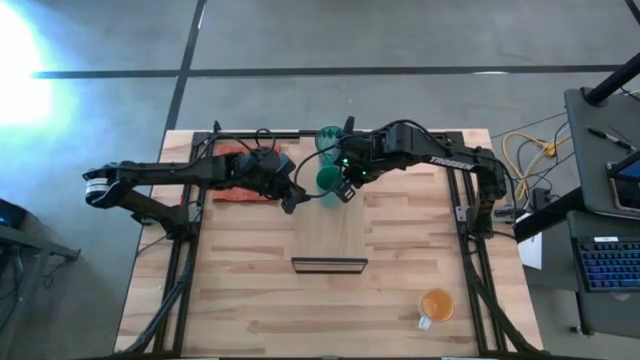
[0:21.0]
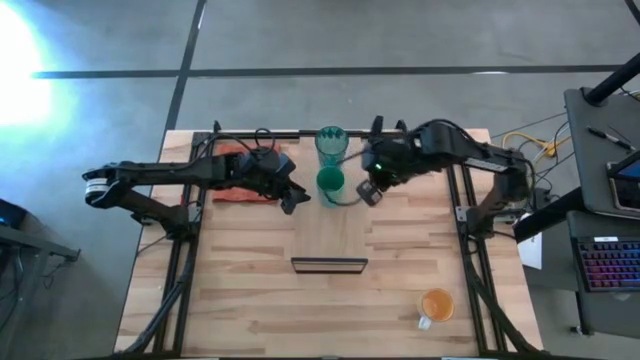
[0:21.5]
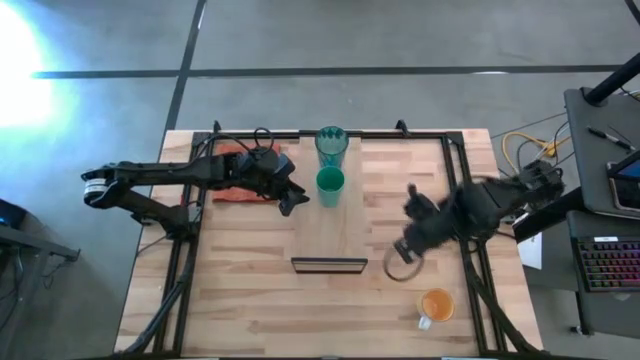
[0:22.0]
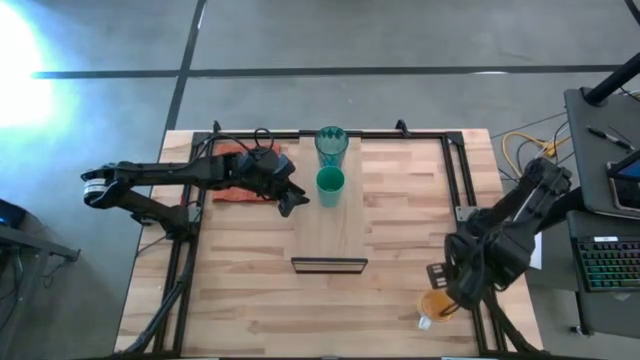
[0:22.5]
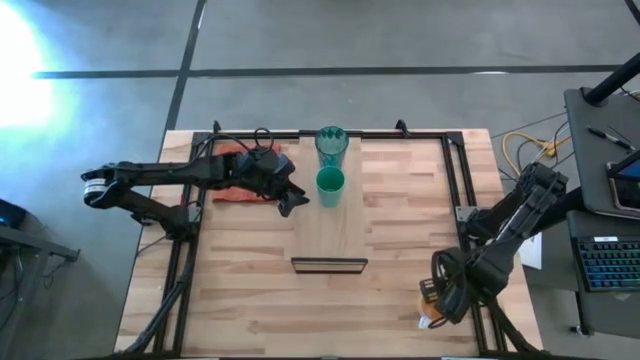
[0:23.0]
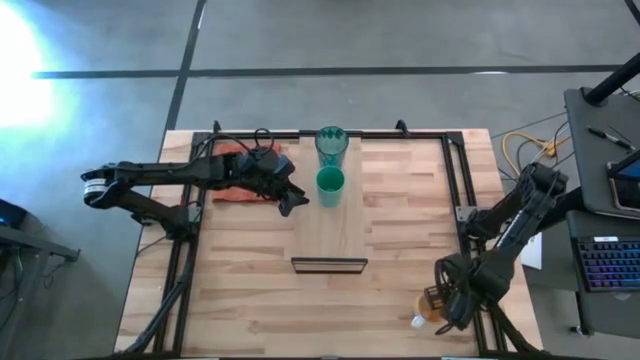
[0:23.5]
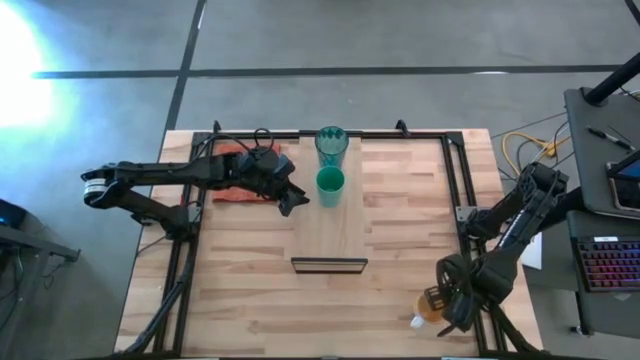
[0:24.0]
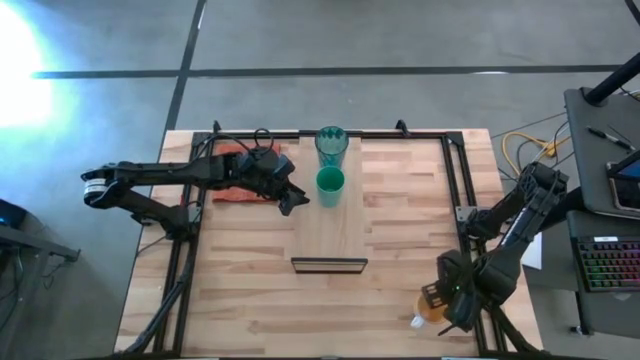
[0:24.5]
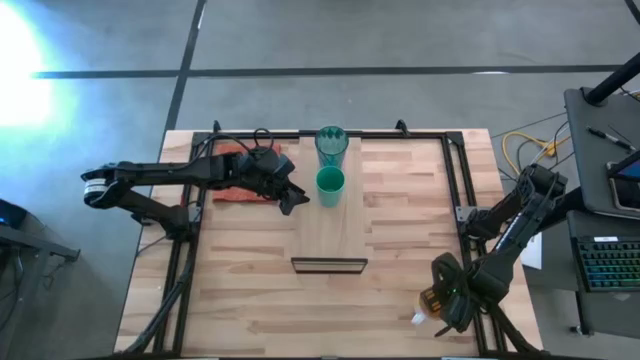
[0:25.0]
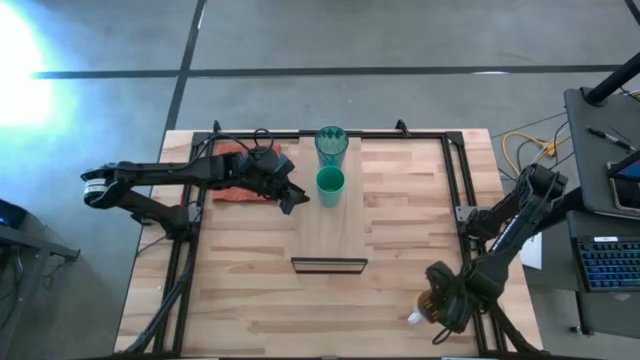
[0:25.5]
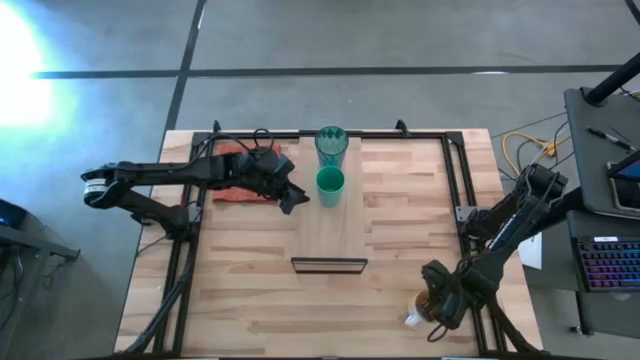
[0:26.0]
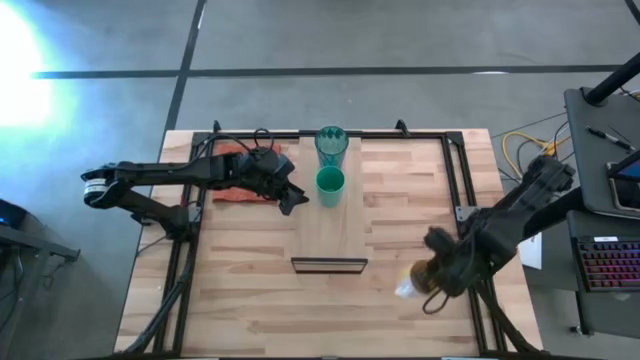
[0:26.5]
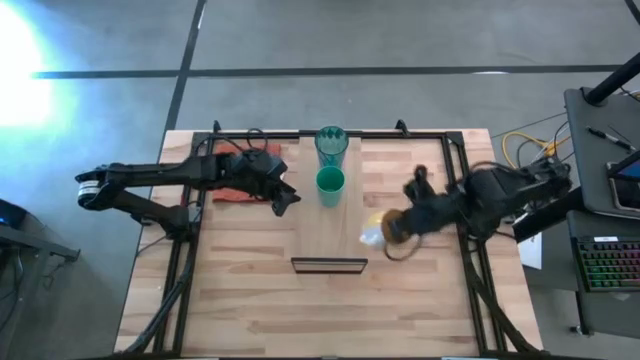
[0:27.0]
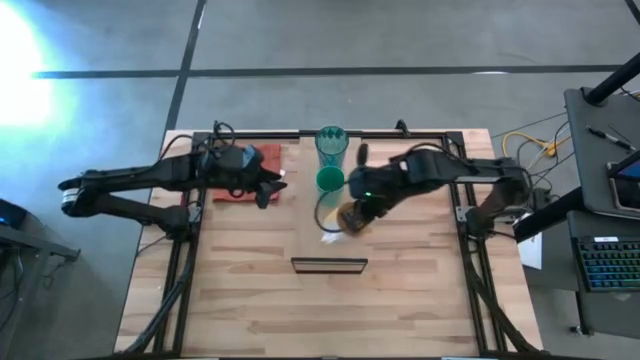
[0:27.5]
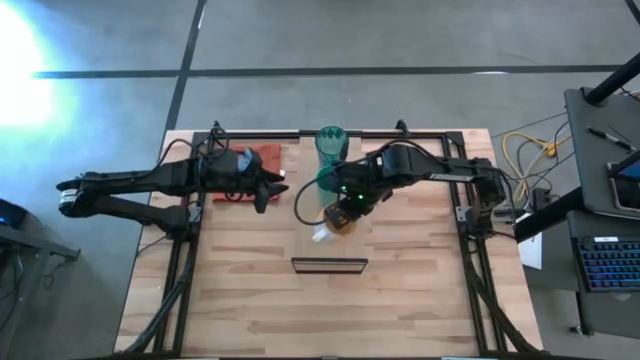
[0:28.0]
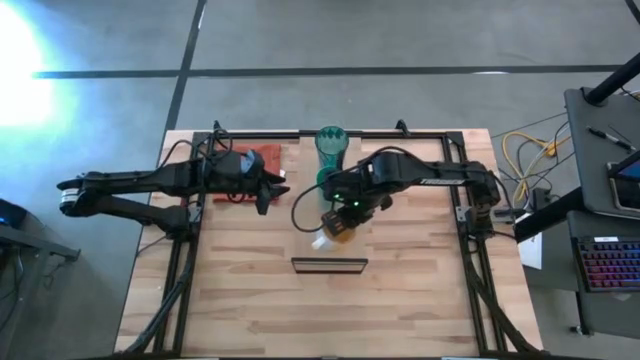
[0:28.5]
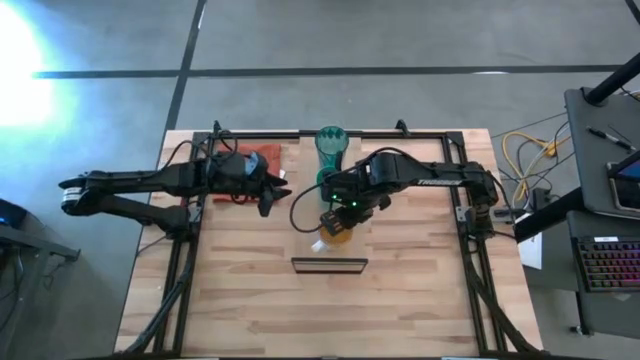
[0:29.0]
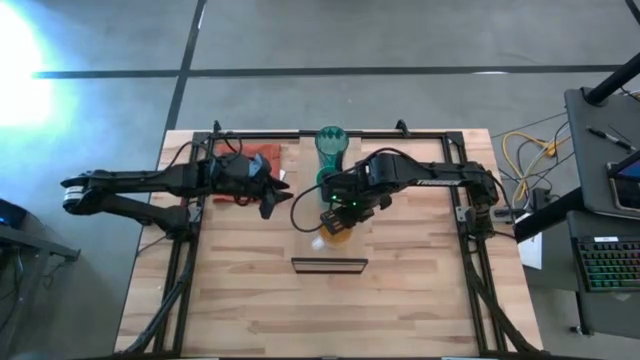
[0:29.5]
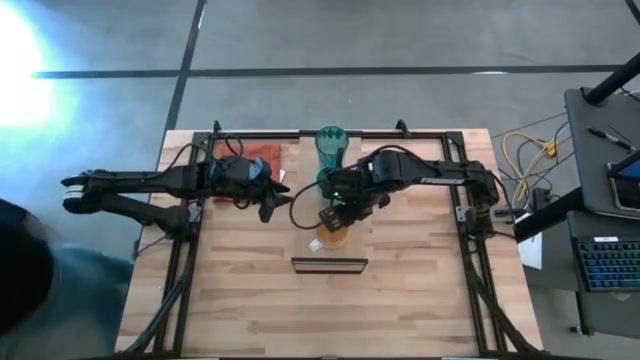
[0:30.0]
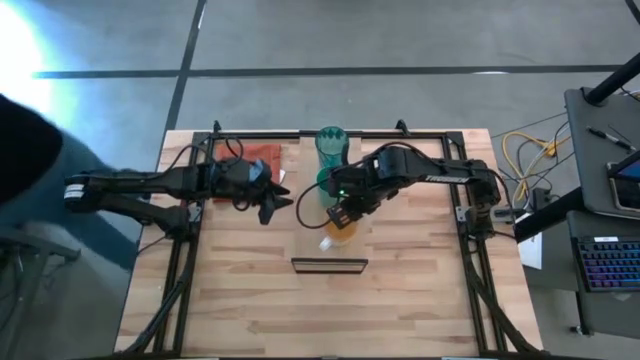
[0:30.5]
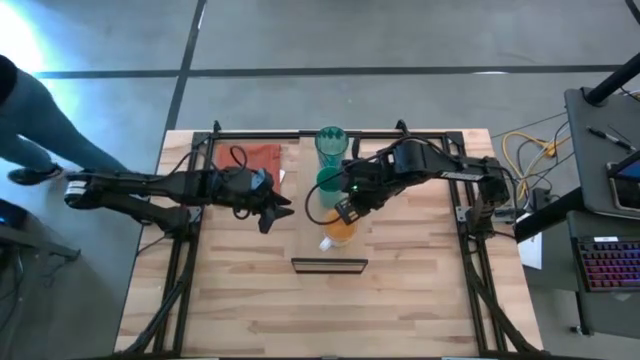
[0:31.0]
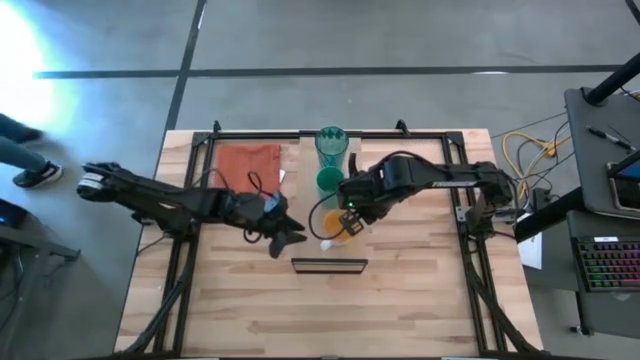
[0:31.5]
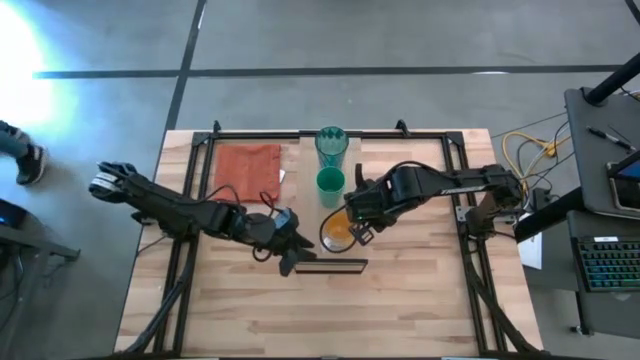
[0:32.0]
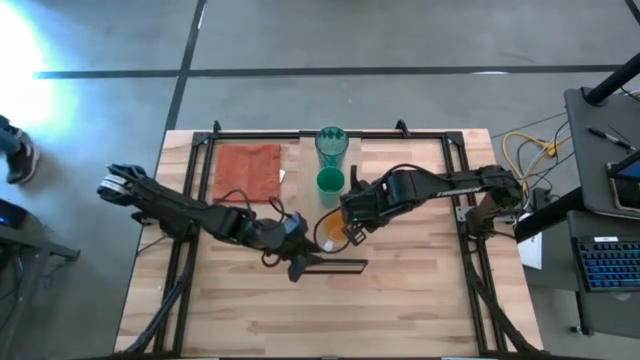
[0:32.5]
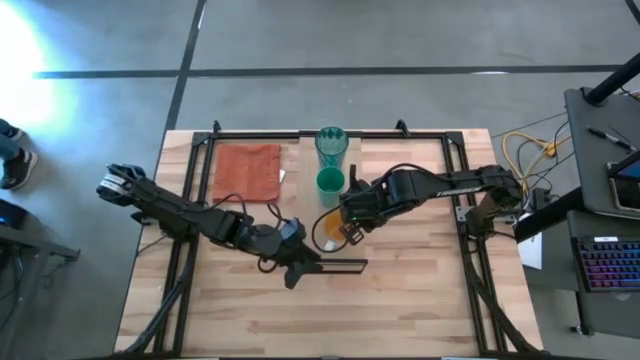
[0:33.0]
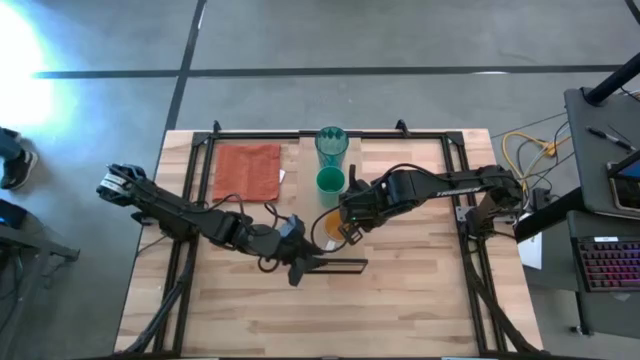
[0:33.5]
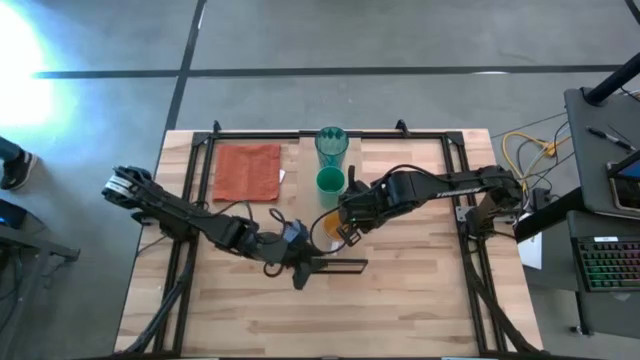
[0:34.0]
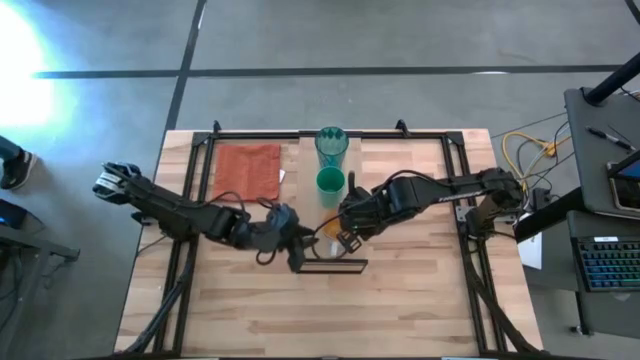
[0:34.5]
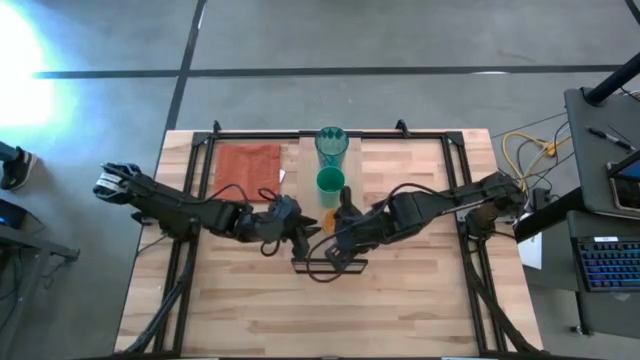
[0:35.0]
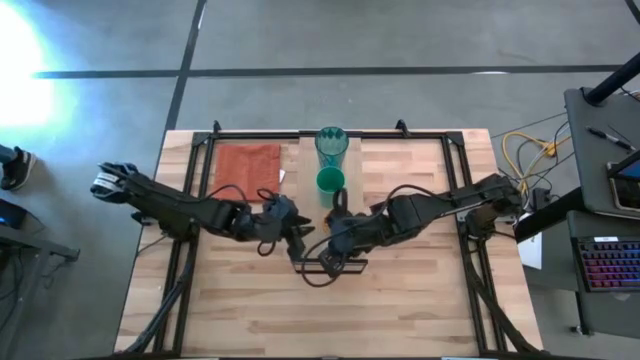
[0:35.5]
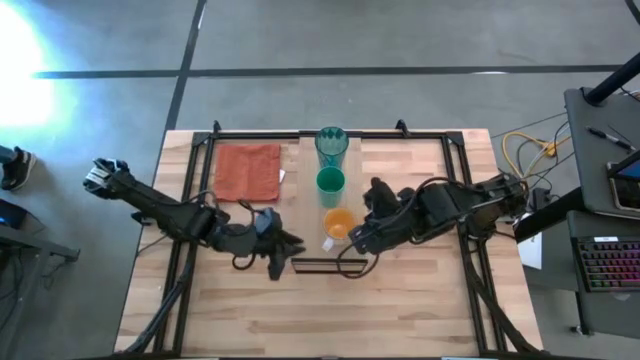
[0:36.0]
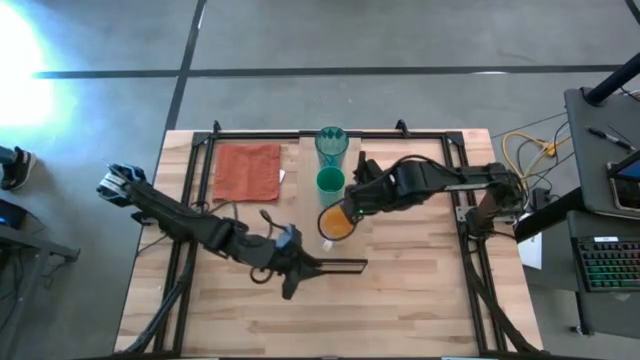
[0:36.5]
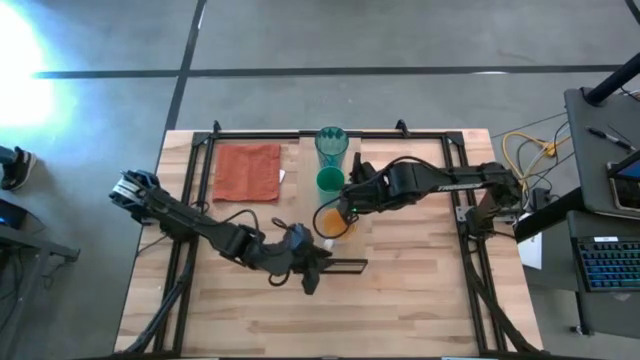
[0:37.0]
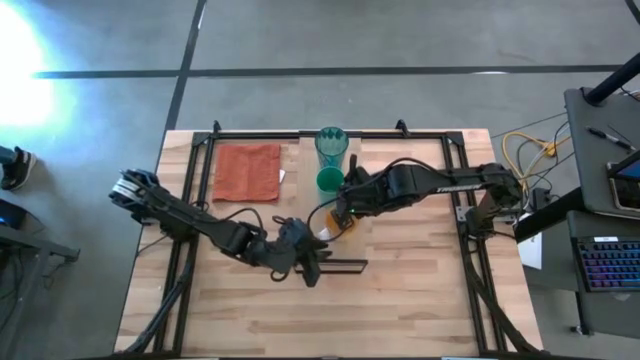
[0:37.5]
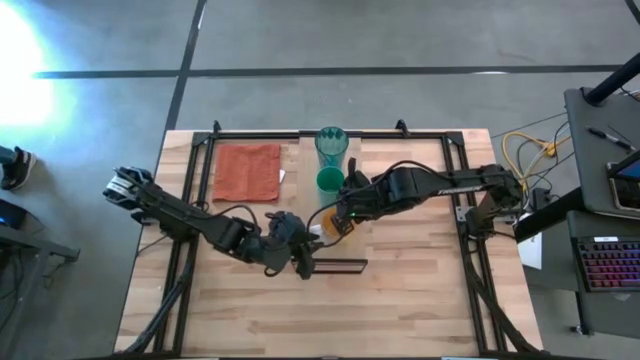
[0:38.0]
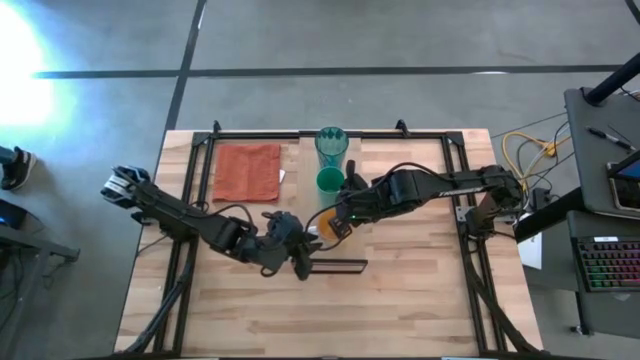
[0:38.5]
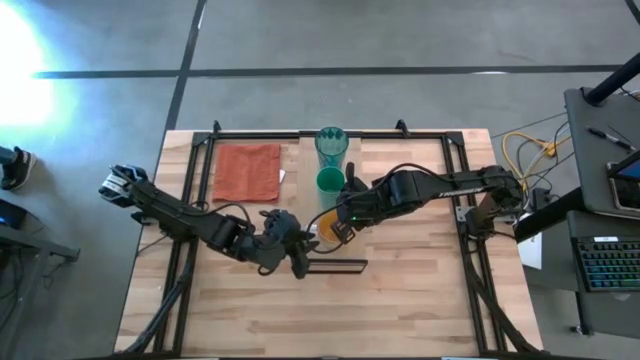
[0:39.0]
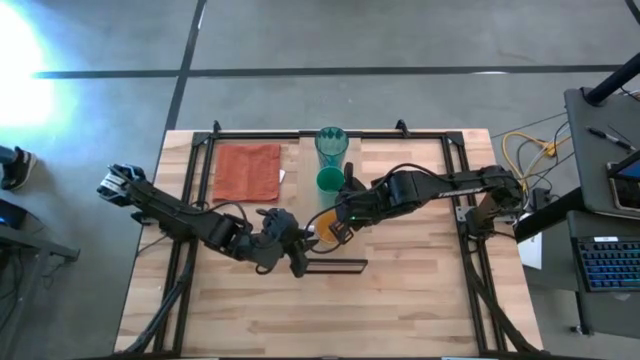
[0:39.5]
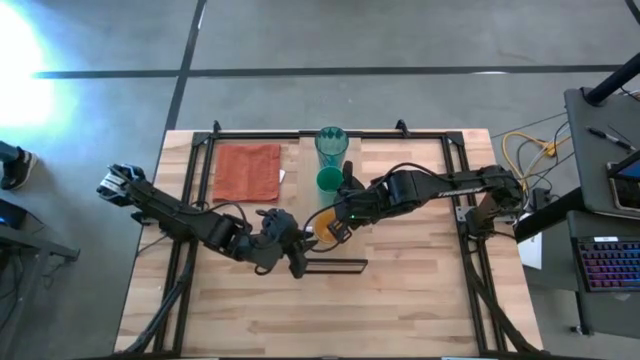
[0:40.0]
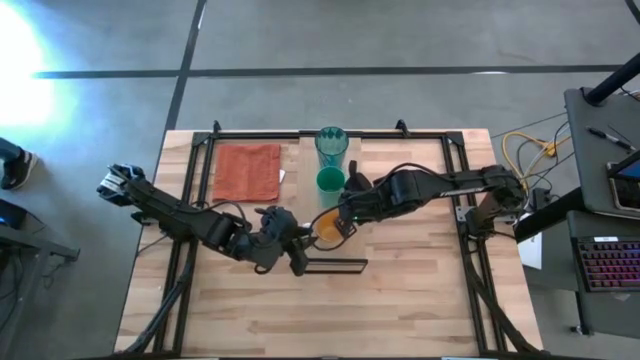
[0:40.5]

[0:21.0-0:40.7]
Task: Stack small to large cups/mugs on shelf
Put the yellow mug on the shelf
